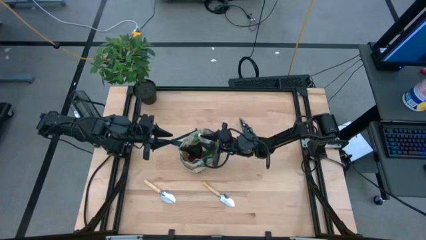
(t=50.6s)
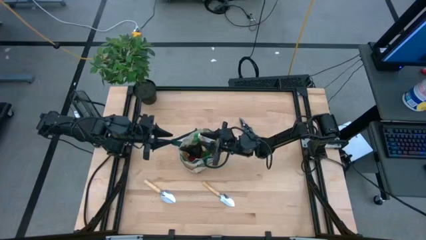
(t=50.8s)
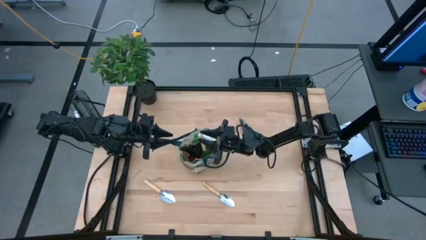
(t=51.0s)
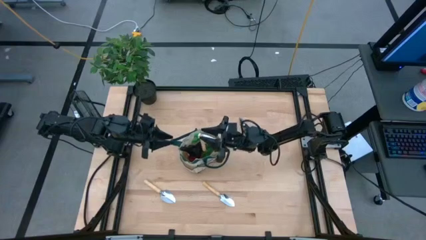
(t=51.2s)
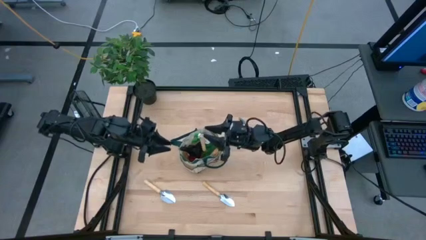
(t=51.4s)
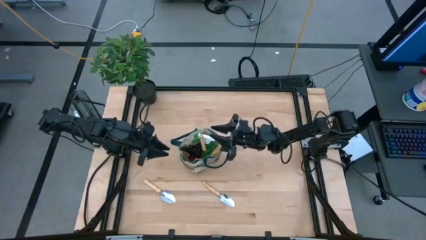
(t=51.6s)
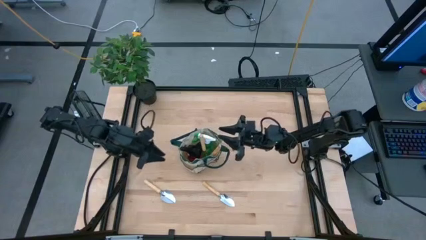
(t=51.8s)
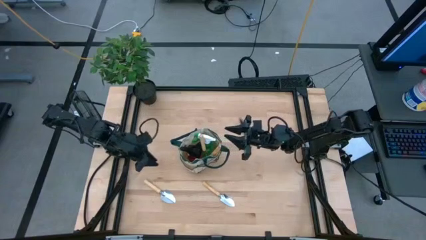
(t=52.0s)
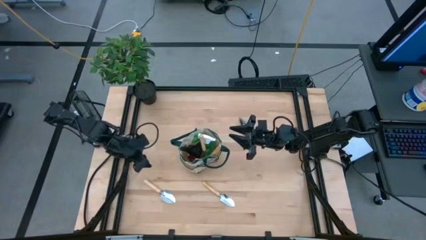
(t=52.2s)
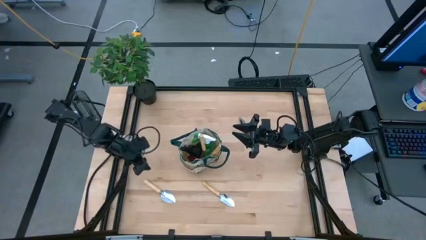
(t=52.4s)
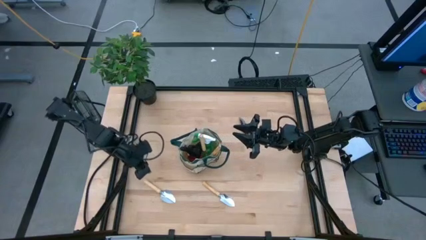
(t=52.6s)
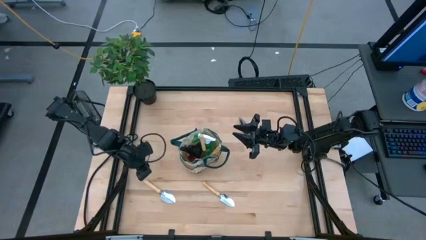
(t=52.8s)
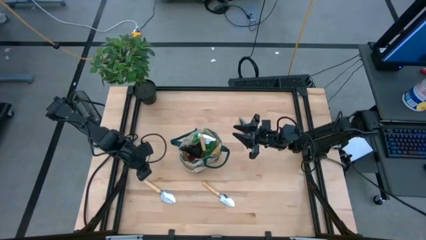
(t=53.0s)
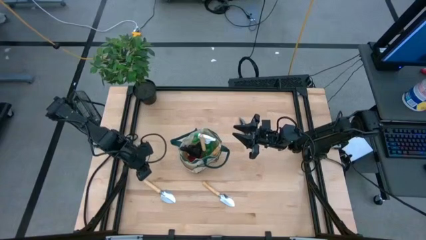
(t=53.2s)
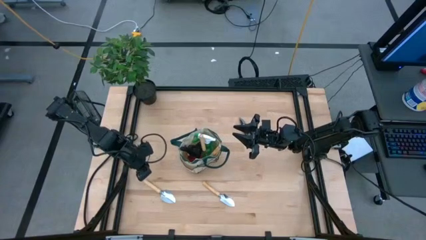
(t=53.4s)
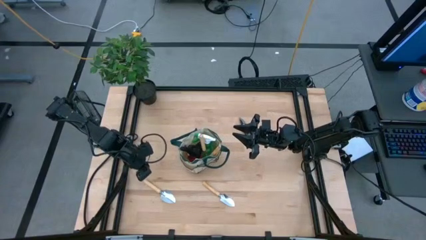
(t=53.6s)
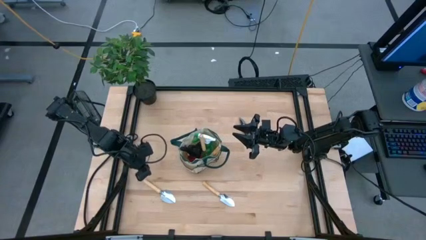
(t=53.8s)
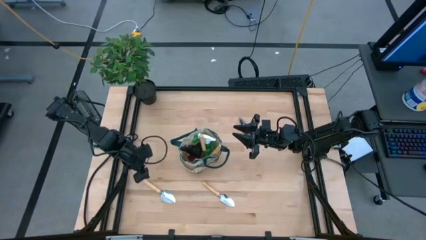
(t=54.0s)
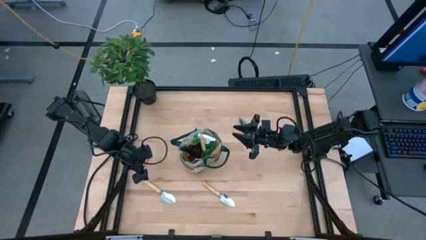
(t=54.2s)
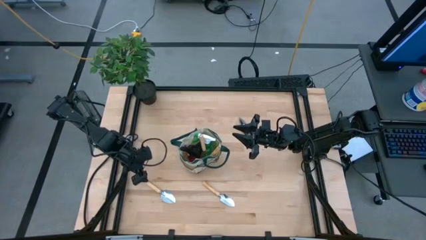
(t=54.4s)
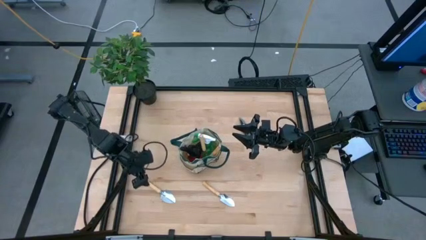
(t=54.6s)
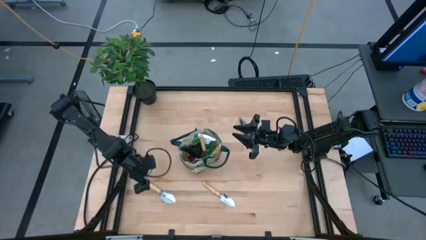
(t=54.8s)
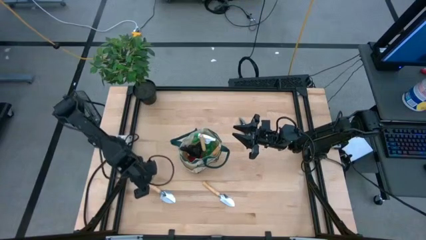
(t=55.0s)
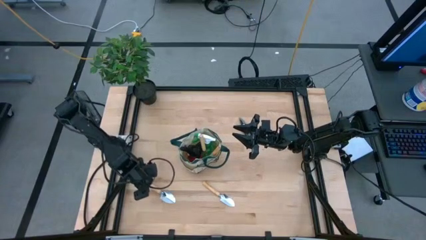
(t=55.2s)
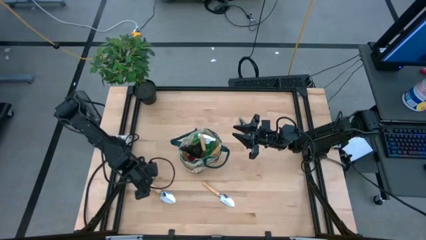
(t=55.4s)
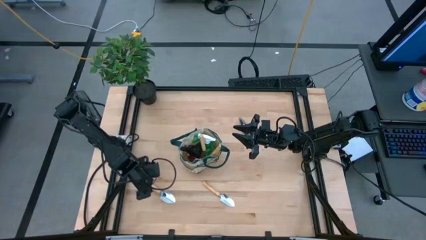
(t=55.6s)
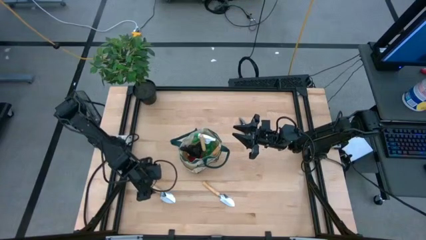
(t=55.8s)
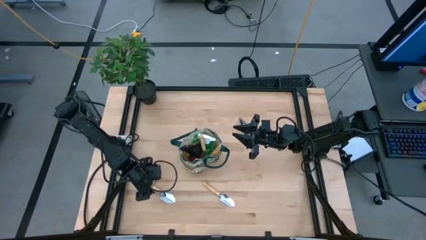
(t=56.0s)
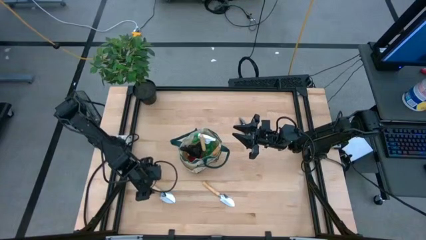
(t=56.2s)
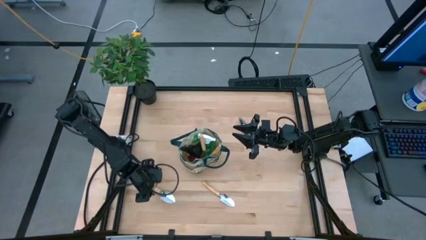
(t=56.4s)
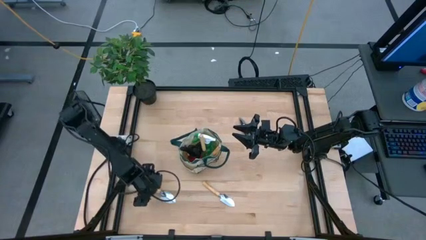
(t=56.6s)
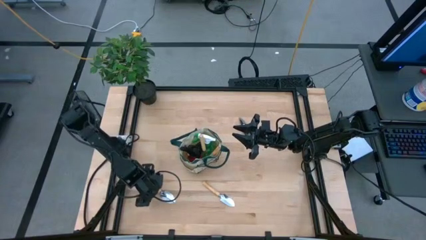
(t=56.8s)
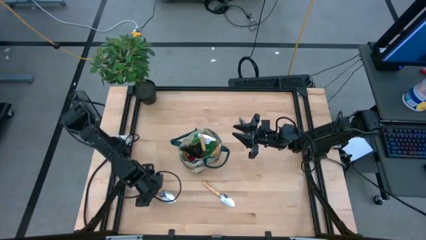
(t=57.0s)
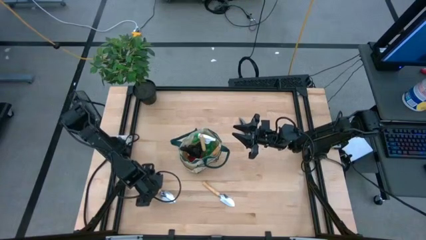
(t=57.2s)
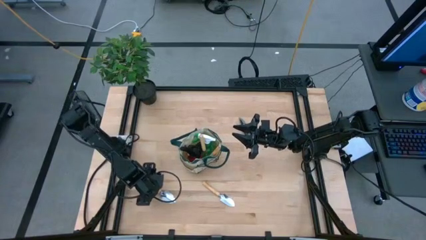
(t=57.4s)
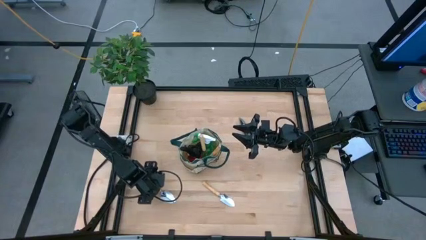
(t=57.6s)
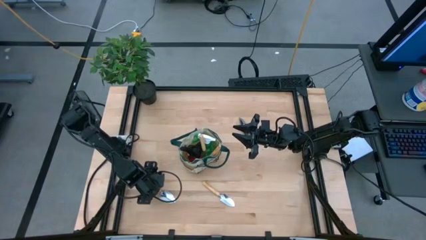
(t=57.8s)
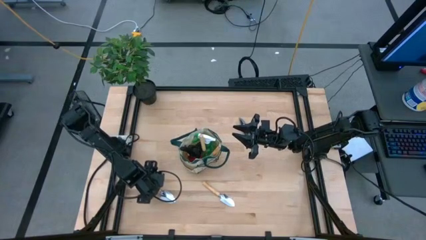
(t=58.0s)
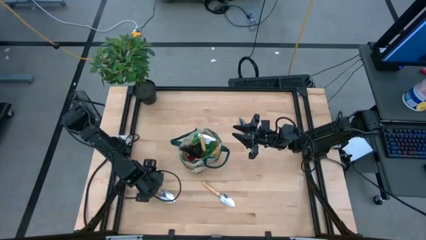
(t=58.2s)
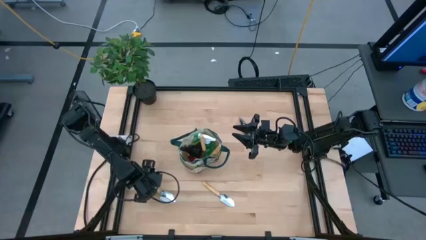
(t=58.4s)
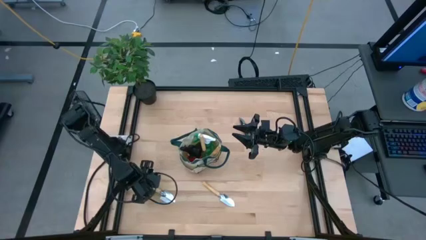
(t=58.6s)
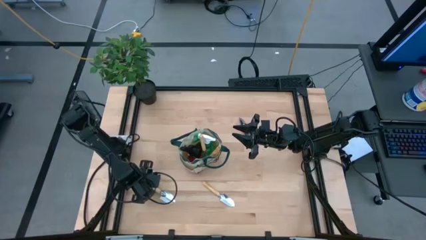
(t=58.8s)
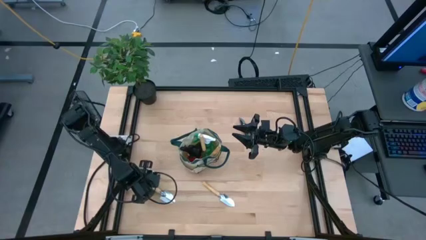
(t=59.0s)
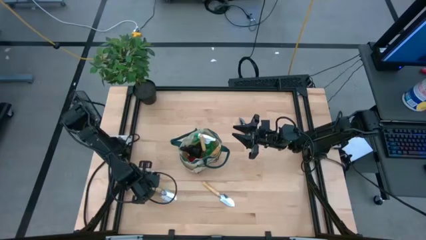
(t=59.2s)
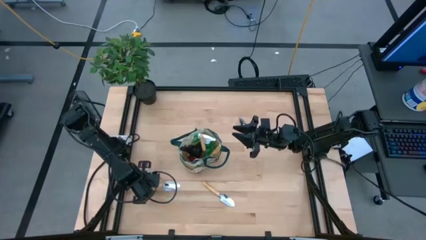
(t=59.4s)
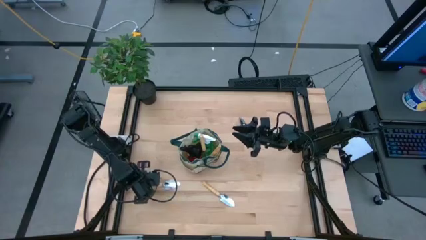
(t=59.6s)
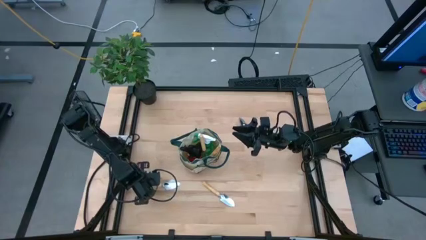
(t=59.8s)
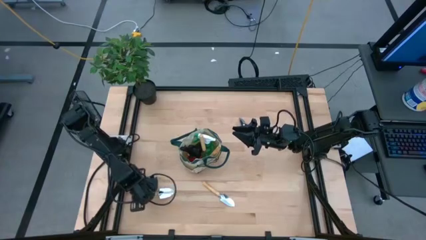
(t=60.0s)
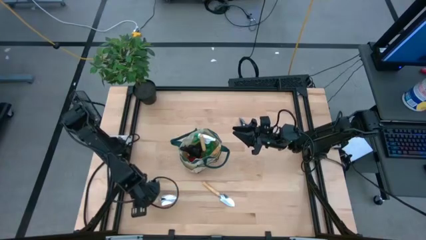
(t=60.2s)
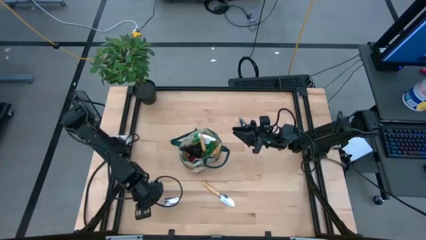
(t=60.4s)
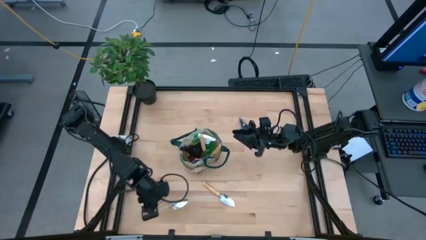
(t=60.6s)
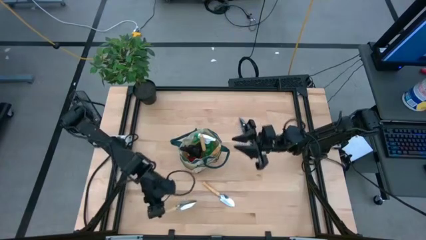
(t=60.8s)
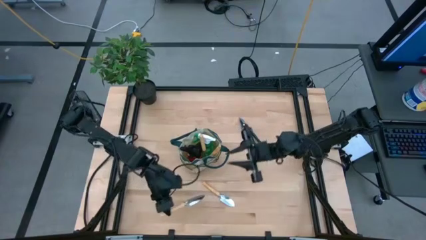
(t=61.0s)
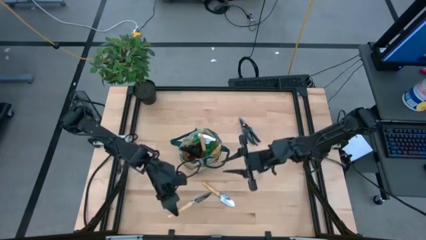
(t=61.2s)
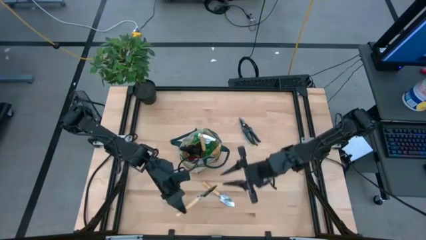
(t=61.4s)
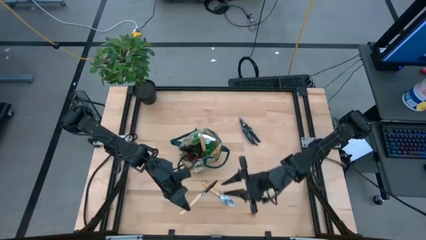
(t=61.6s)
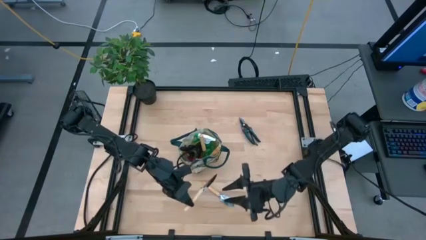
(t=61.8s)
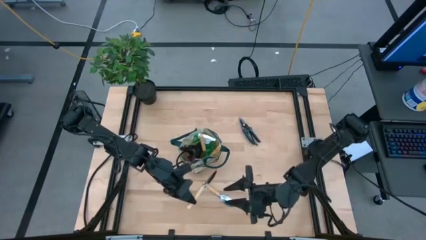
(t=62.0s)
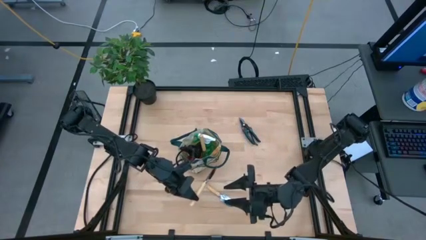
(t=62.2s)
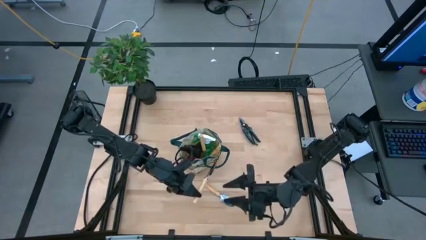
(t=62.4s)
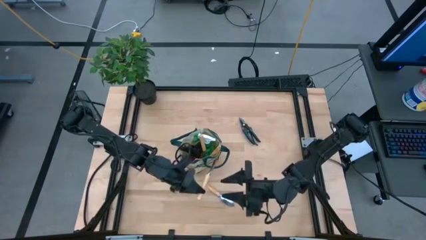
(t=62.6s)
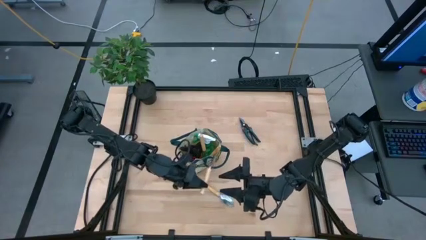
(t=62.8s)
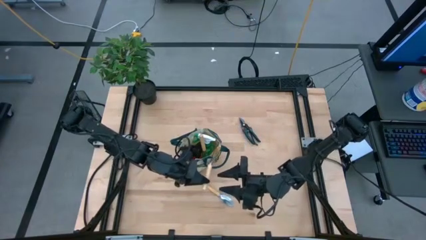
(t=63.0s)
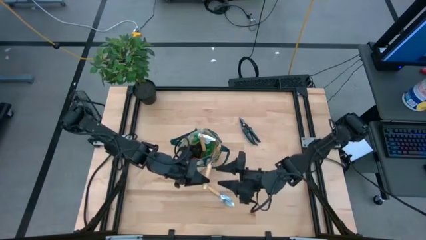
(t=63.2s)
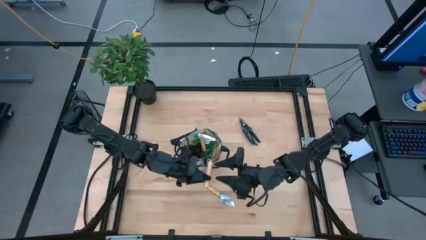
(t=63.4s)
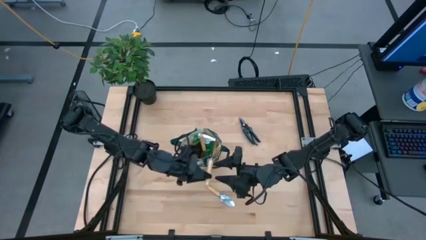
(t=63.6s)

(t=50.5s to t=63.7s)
Task: Pick & Place Garden tools in Gardening bag
Put the left brown trowel into the gardening bag
